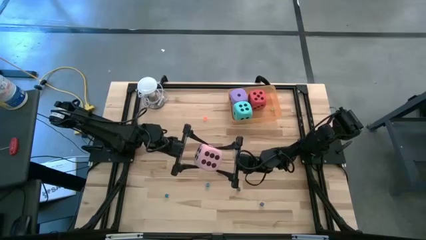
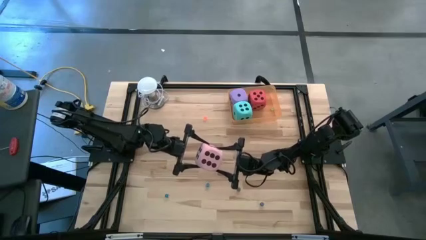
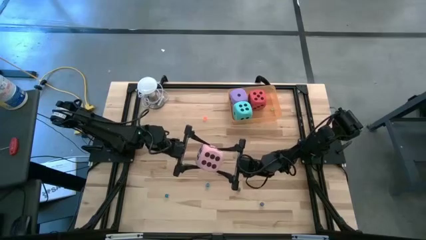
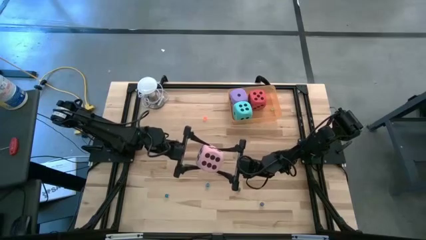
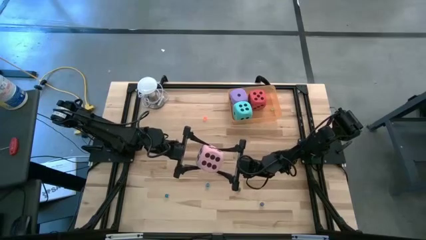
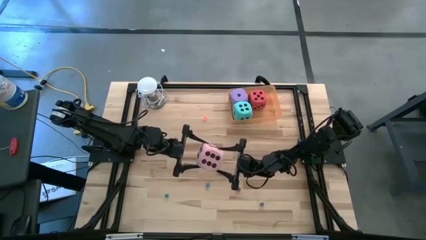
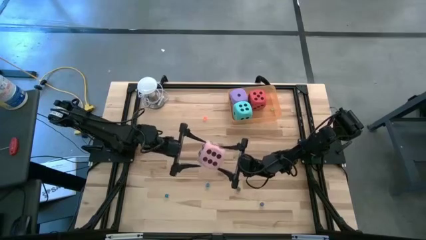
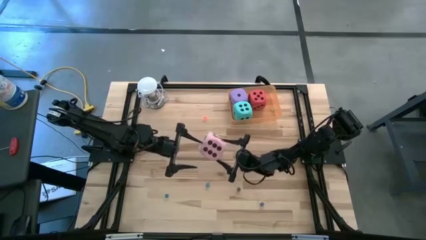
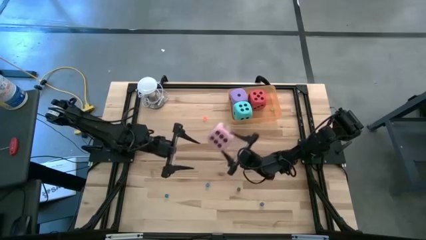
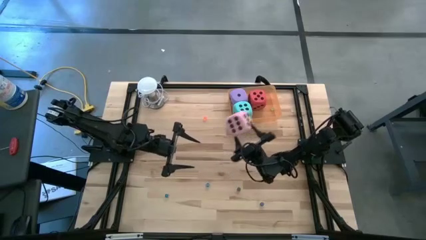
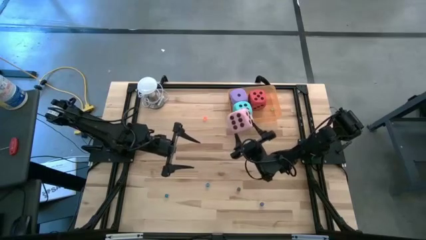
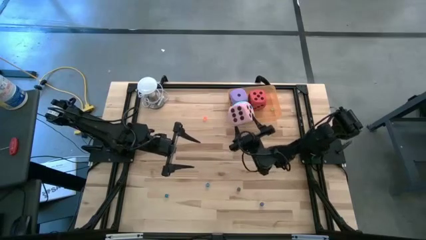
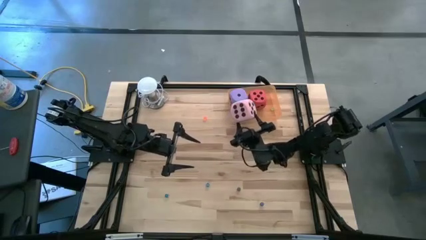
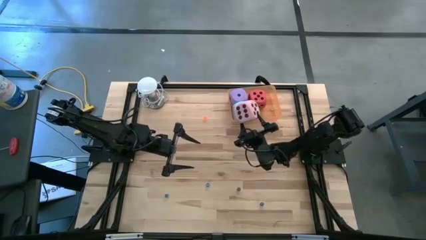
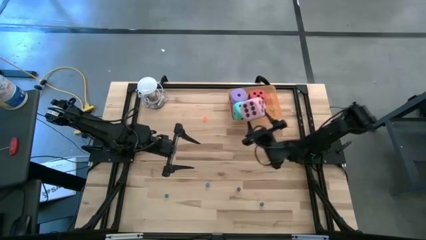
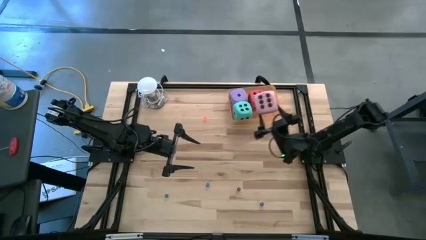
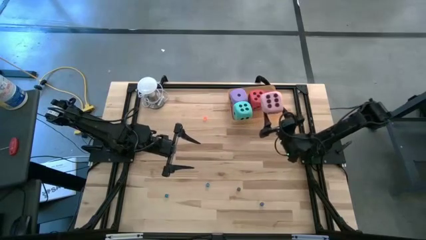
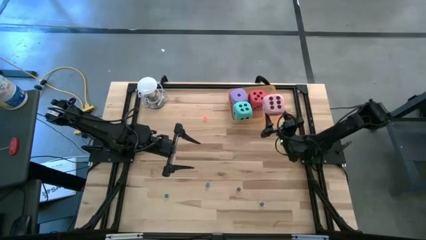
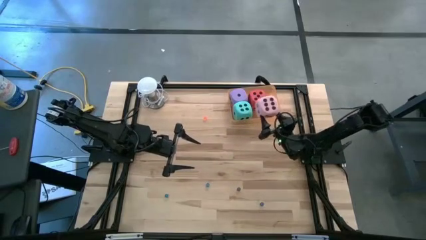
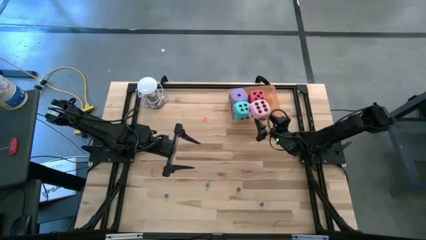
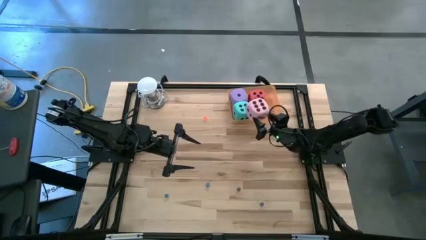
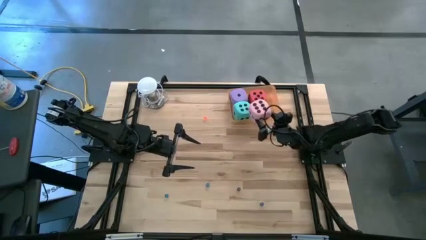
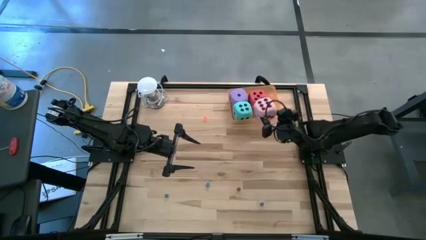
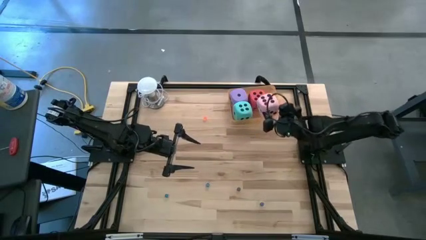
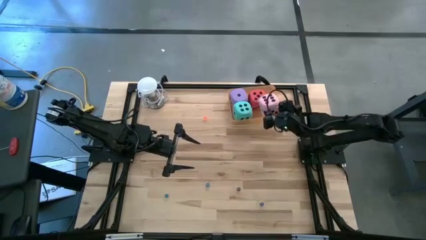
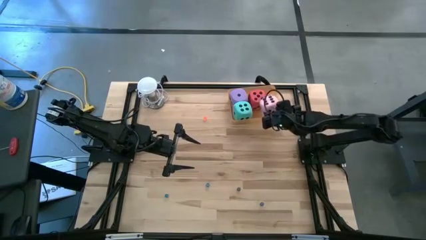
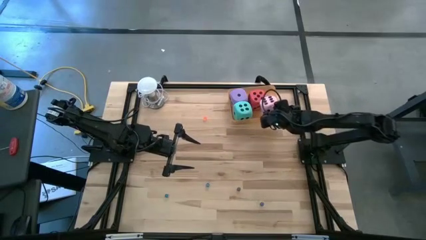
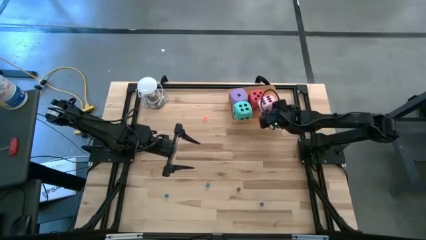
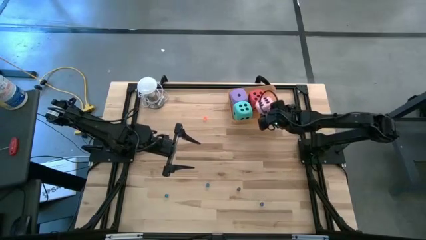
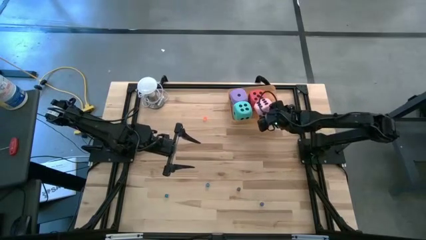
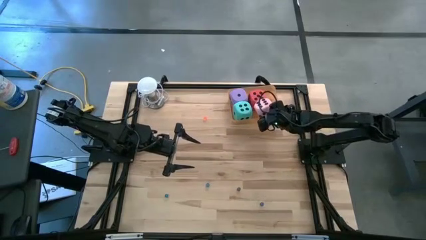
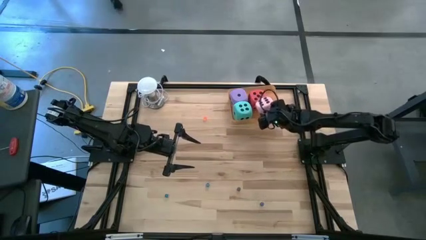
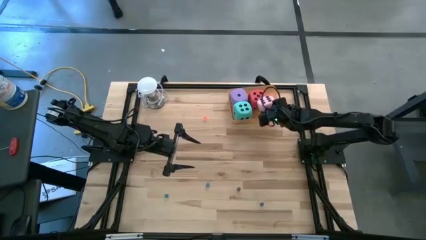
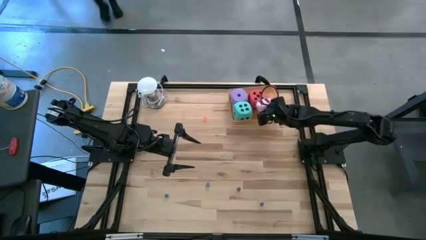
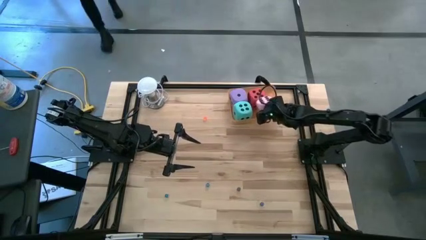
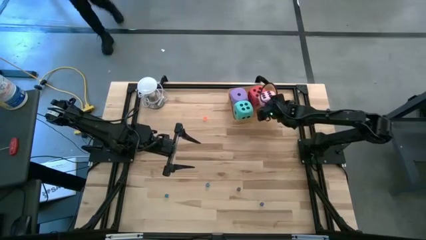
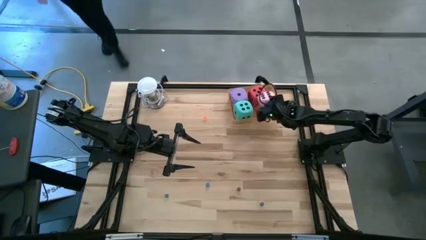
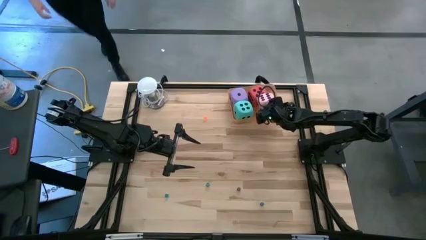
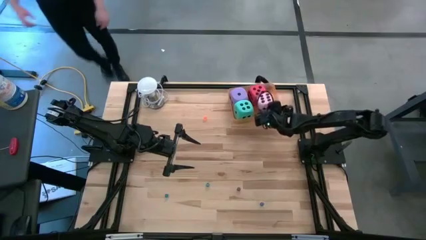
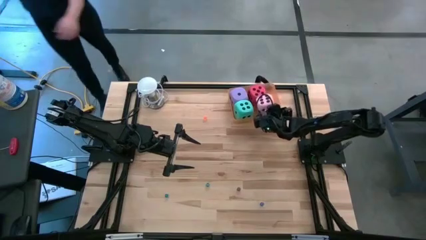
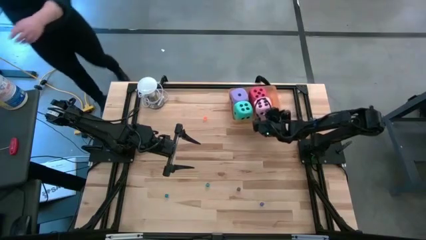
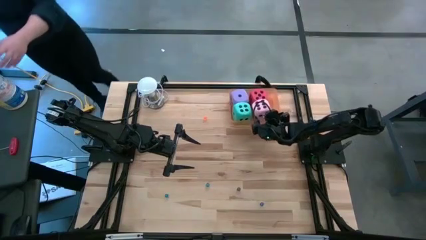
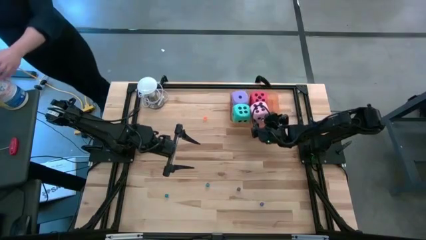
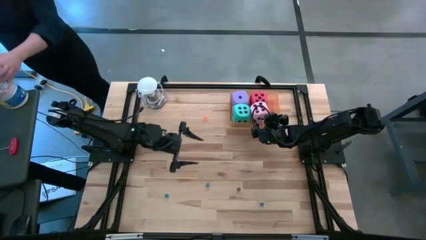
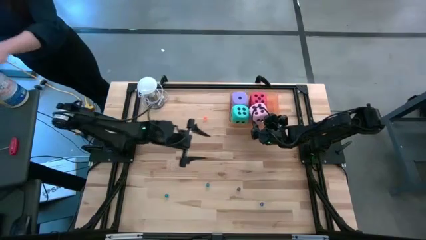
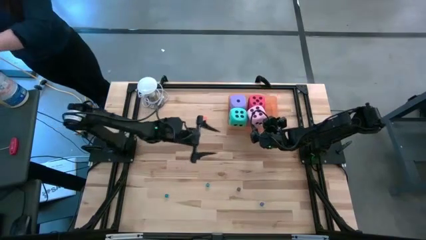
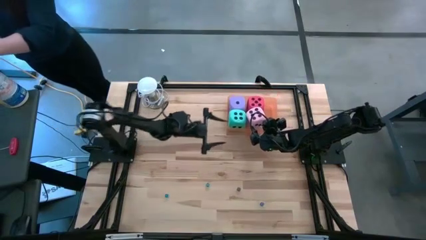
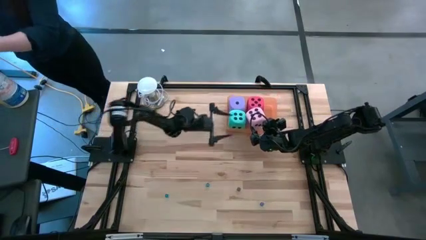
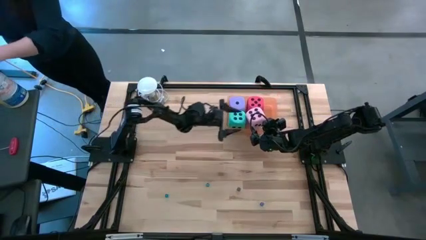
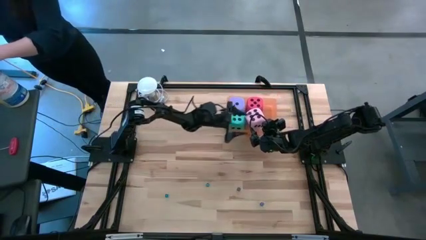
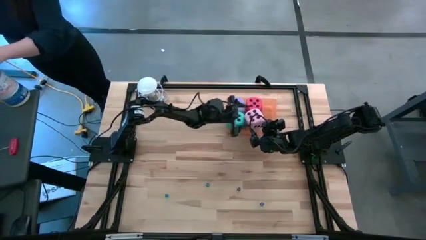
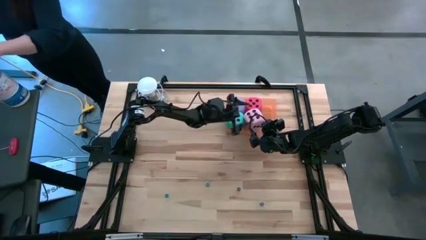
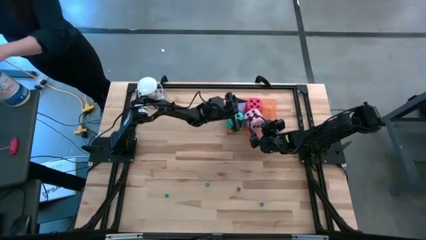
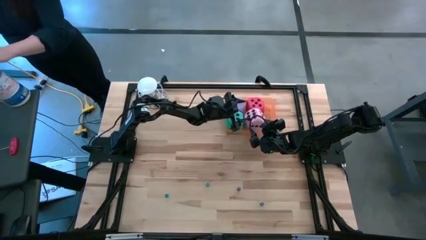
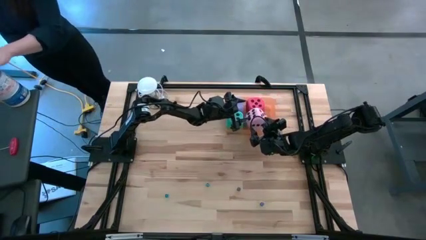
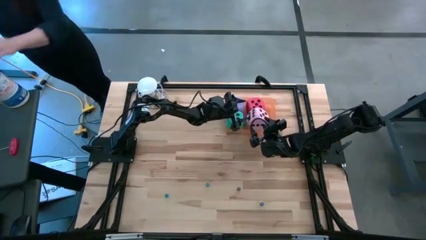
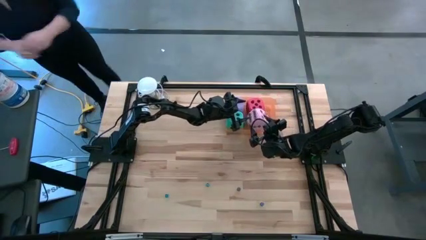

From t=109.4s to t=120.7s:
Task: Pick & Place Dice
Put the large pink die into the orange bin

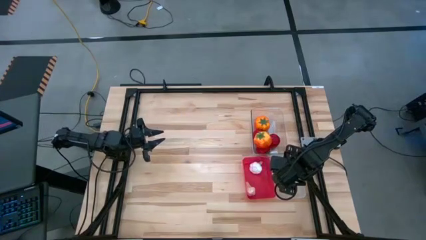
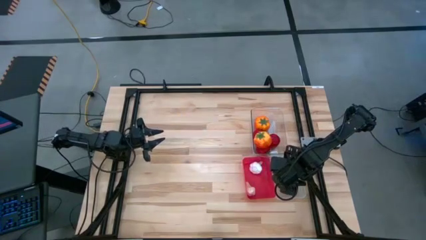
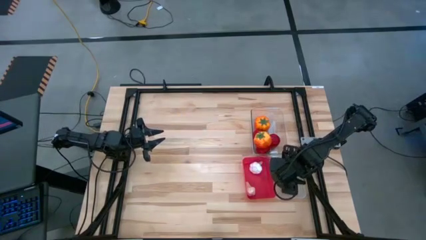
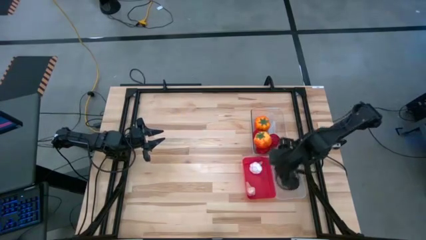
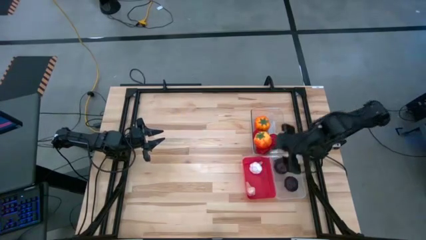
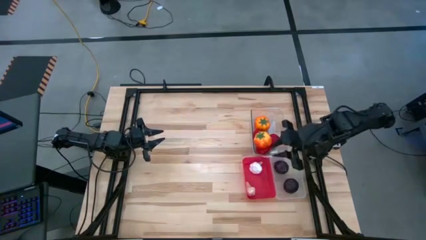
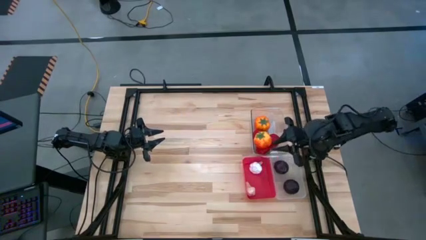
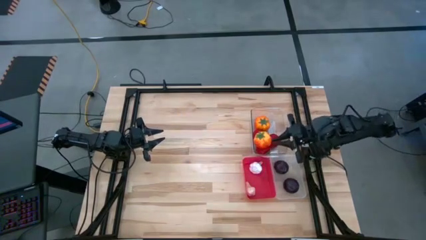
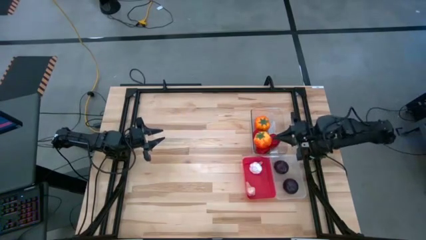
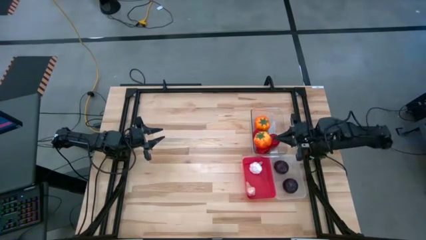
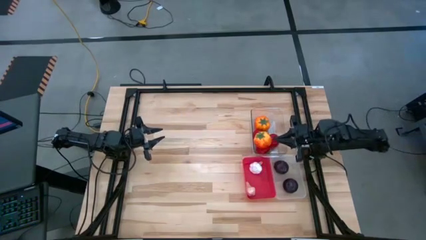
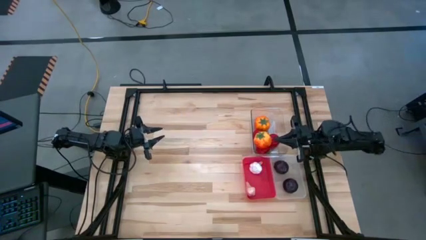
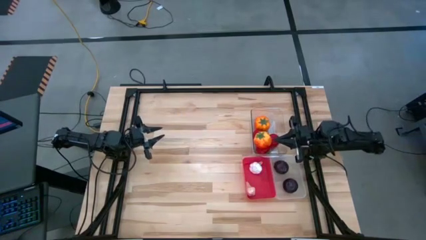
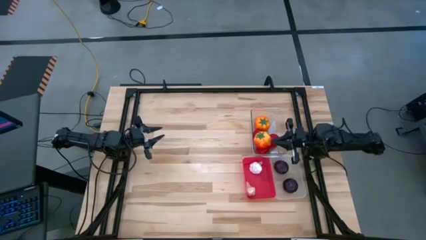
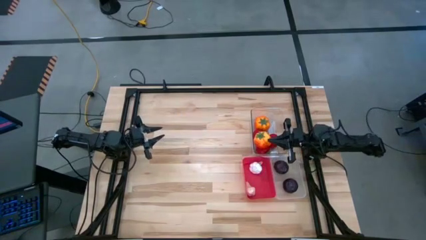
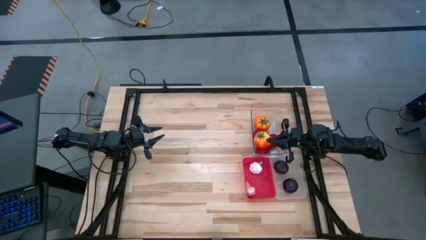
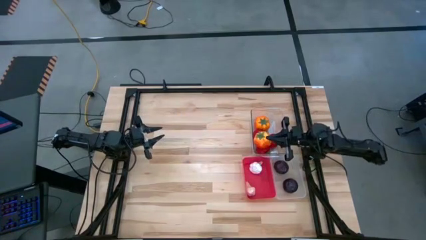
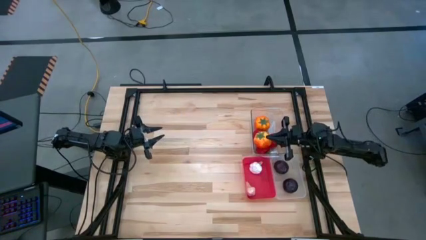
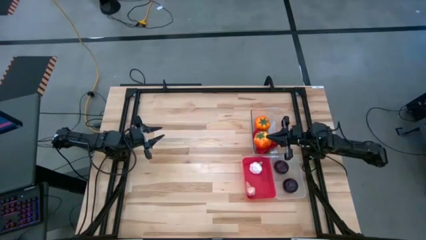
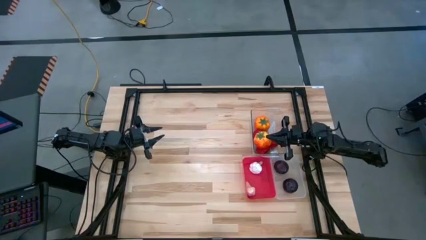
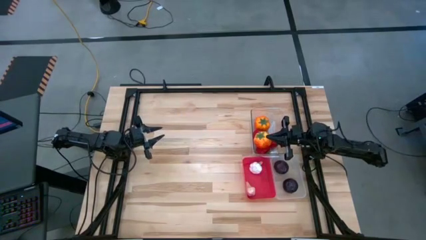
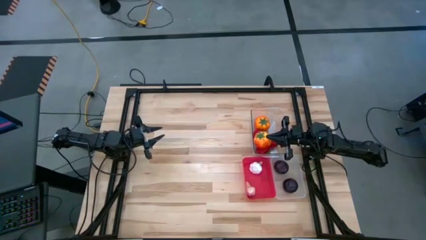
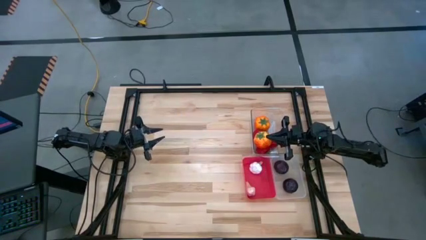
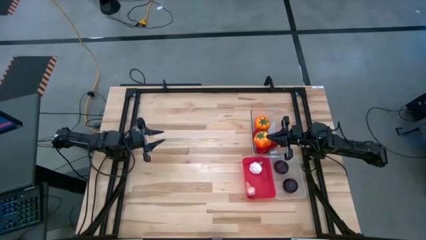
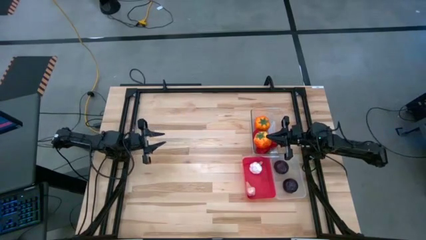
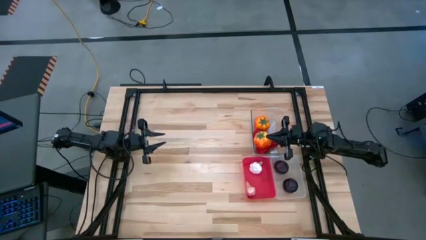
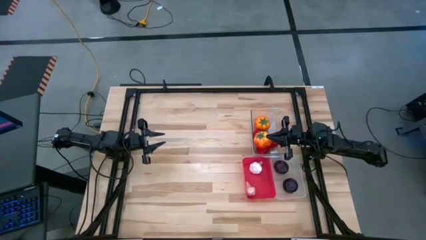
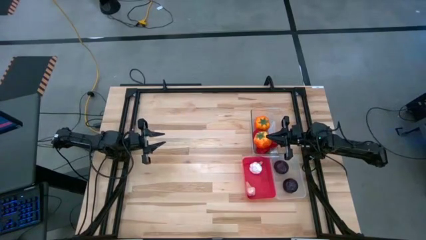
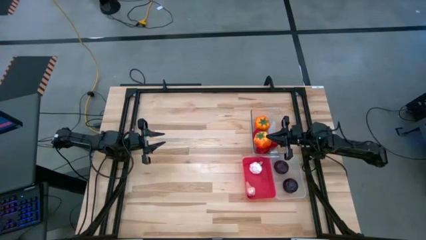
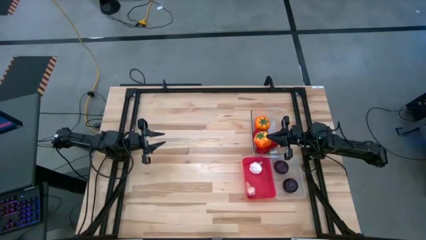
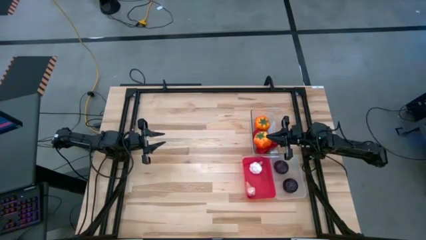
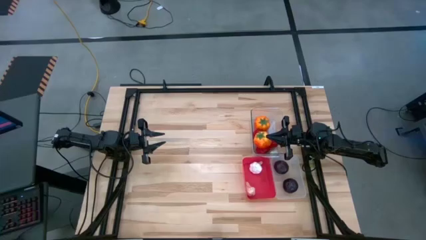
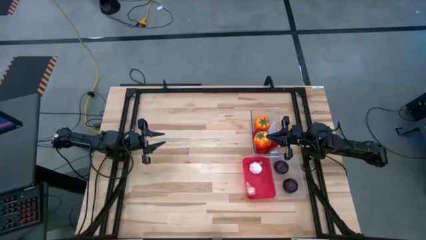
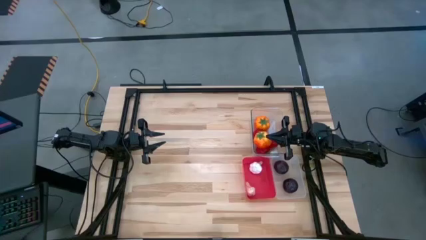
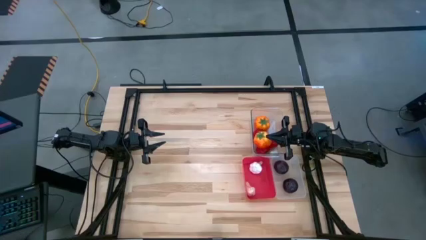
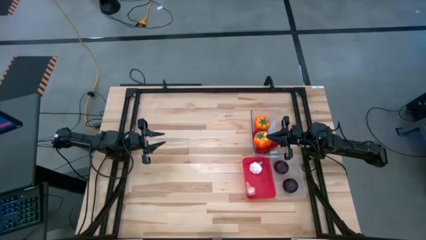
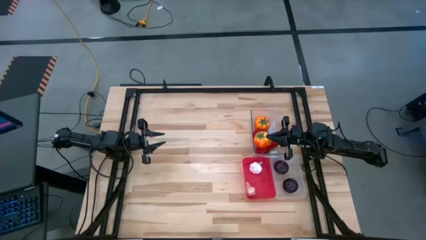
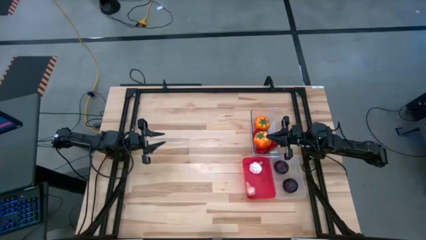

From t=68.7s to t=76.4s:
Task: Sort produce into baskets
Return to Home Position
